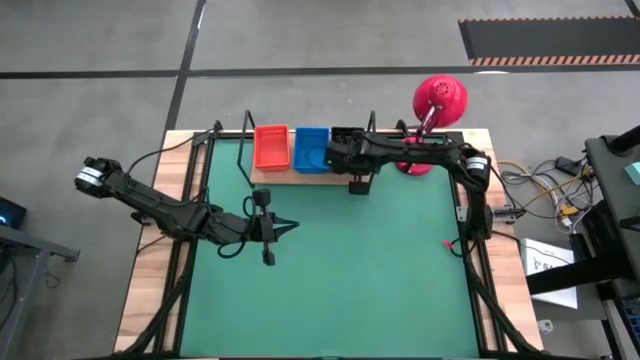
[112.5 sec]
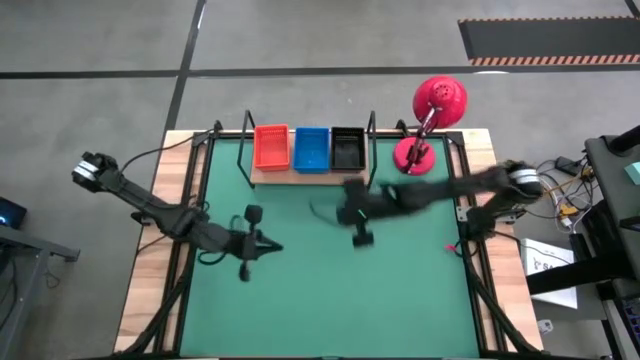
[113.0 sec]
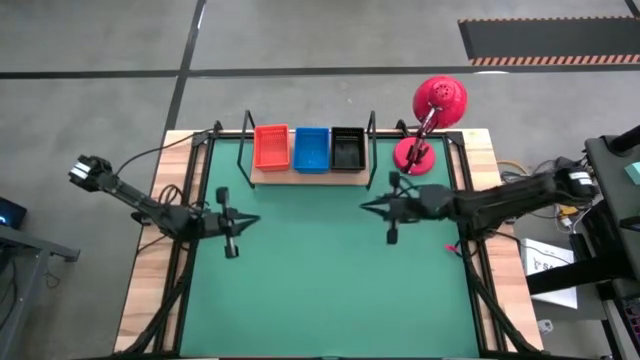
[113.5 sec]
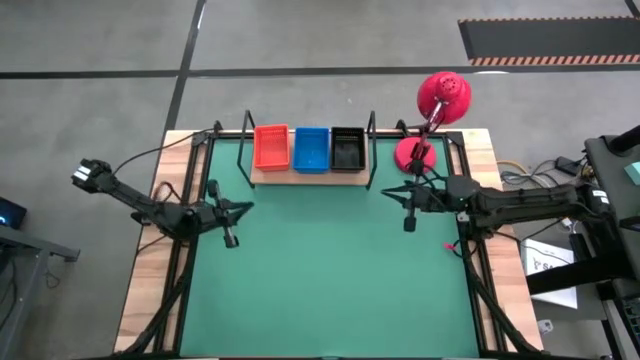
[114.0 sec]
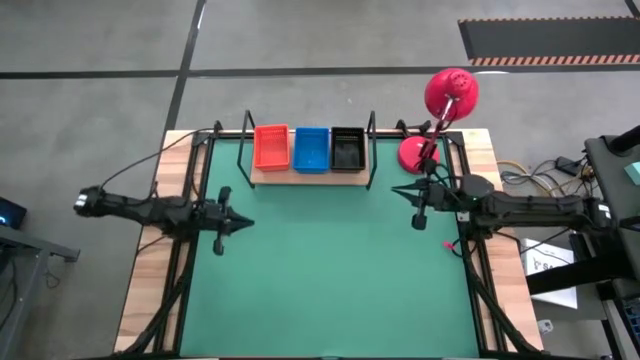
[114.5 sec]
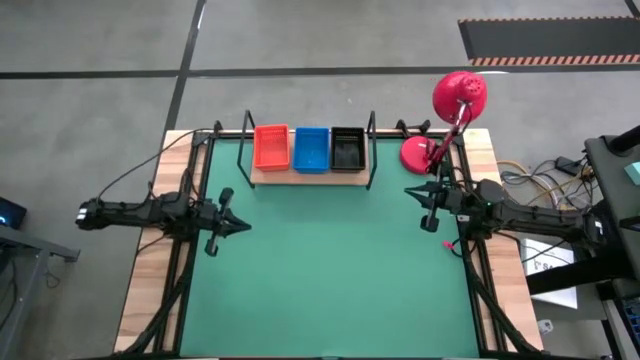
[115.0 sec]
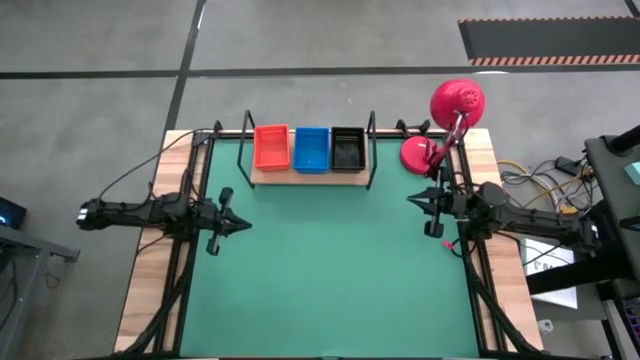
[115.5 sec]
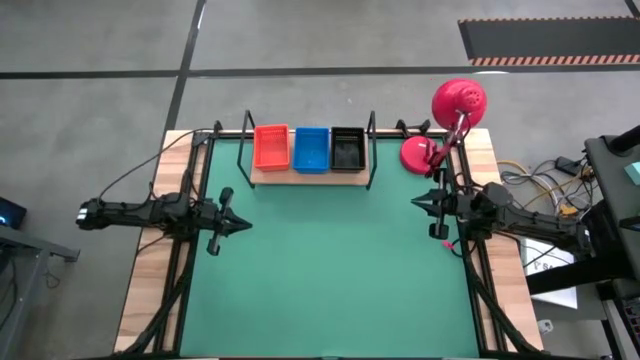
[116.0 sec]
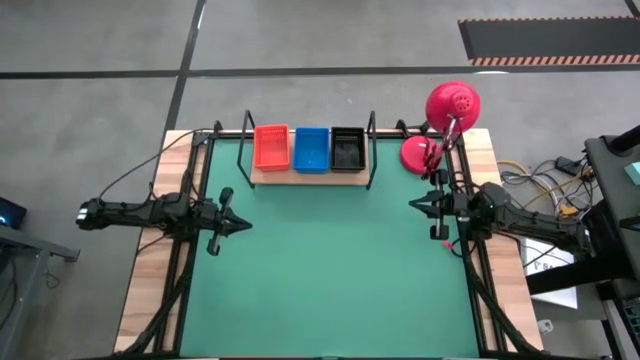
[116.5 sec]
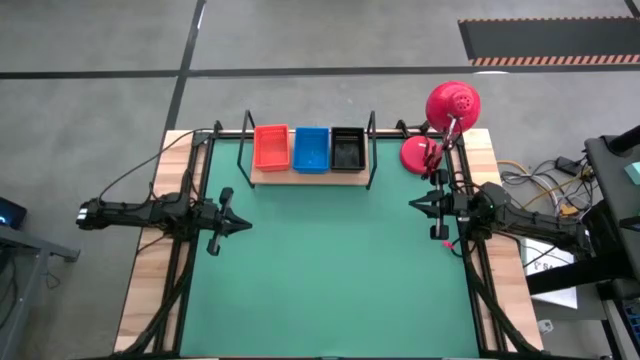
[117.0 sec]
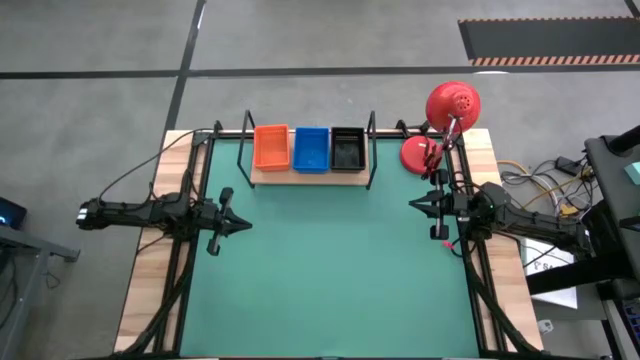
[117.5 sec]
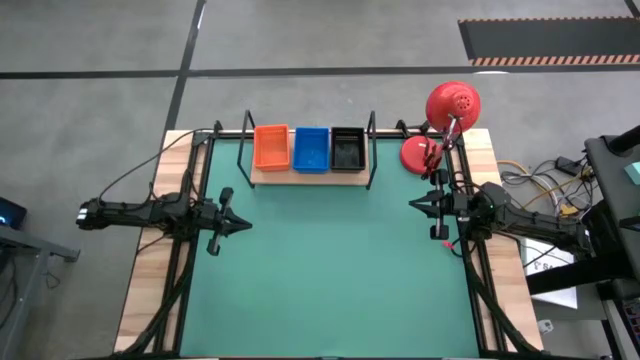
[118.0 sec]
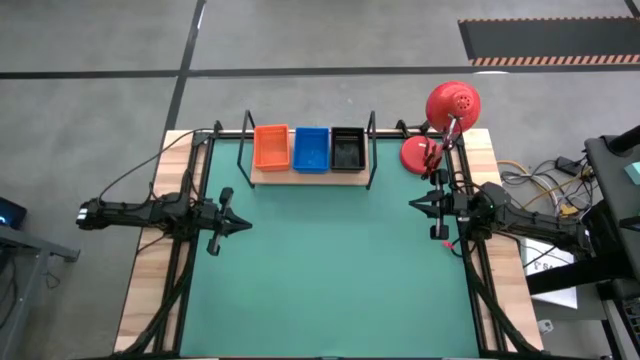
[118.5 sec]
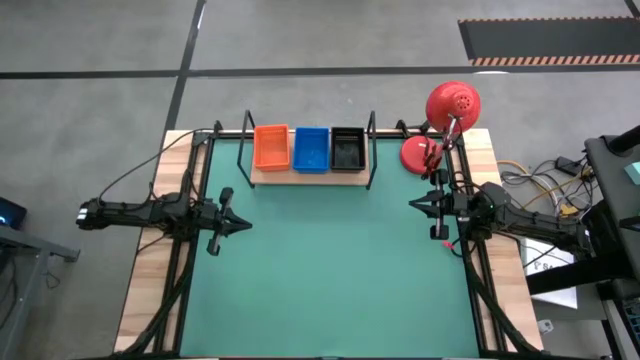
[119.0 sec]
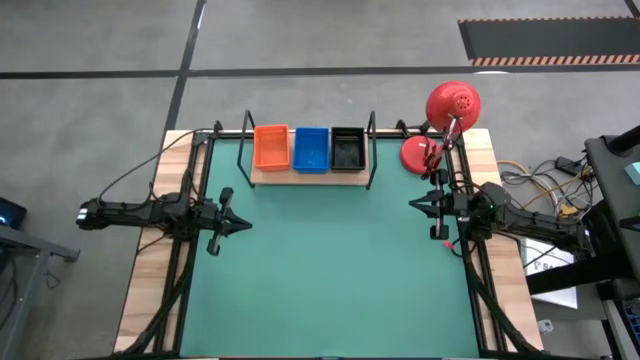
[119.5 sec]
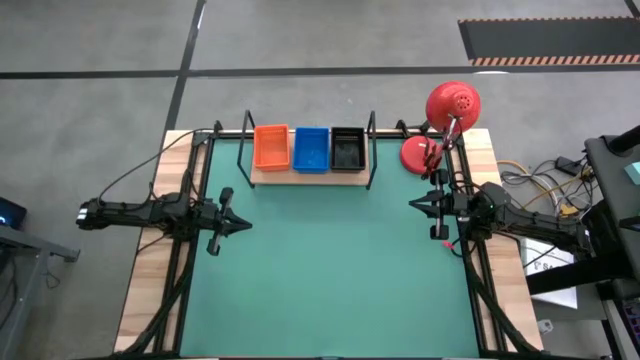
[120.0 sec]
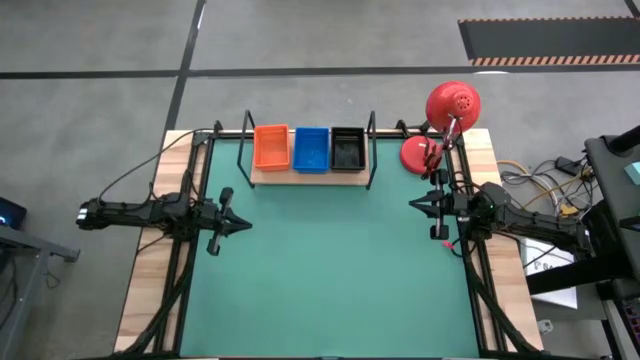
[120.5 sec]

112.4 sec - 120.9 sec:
Task: Stack baskets on shelf by color
Return to Home Position

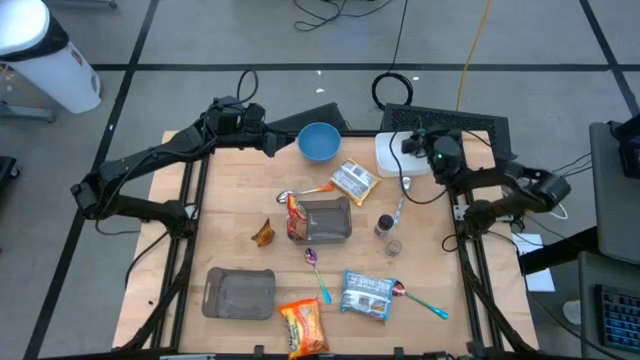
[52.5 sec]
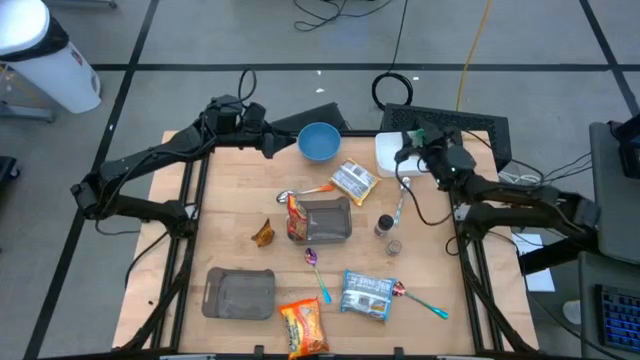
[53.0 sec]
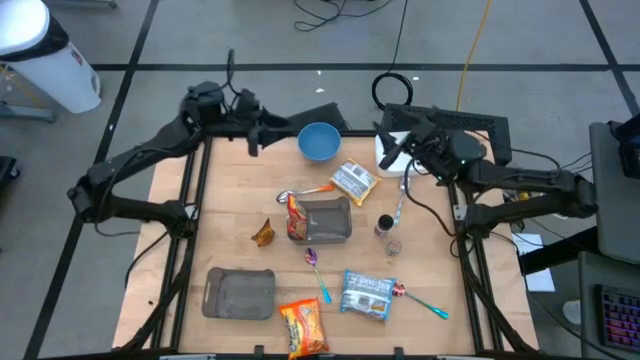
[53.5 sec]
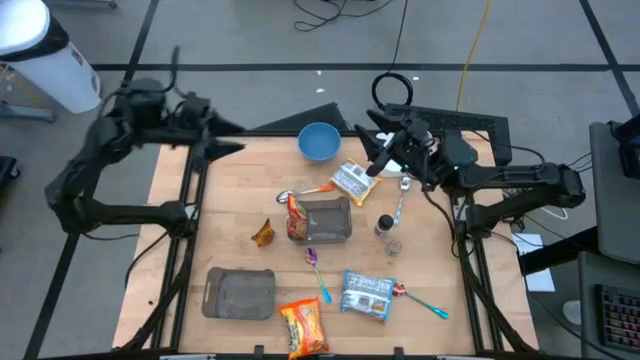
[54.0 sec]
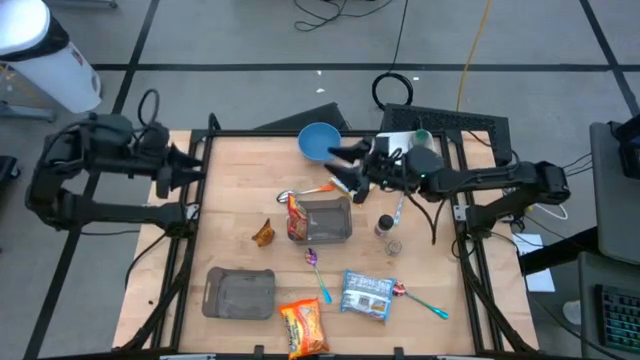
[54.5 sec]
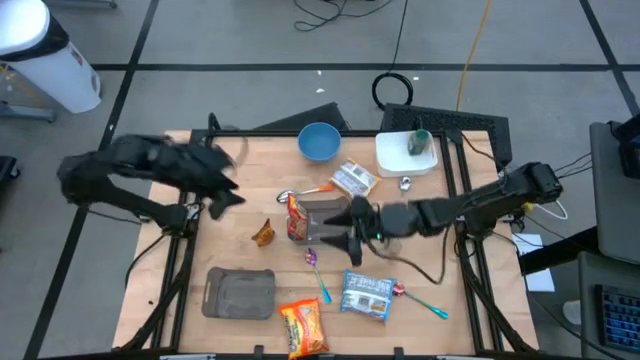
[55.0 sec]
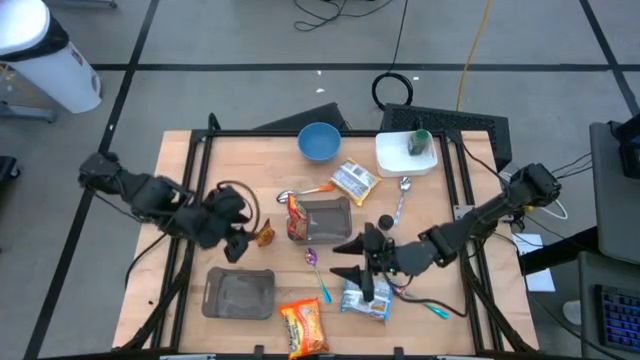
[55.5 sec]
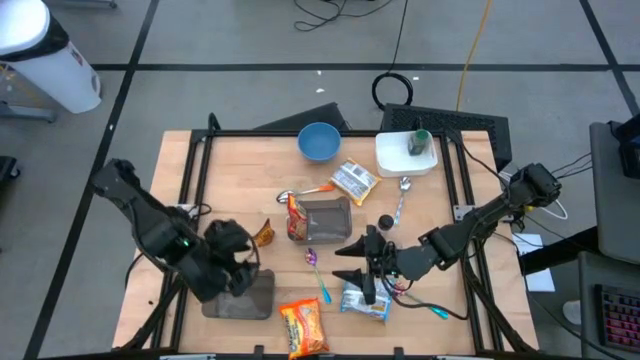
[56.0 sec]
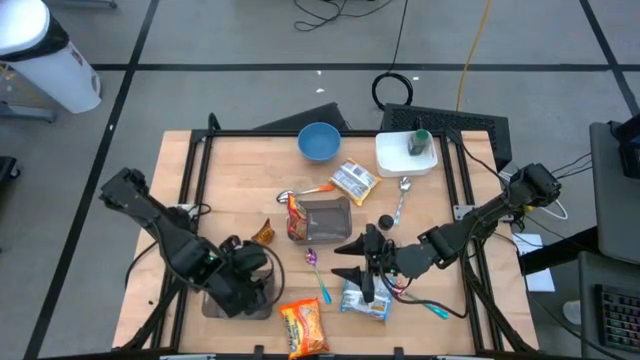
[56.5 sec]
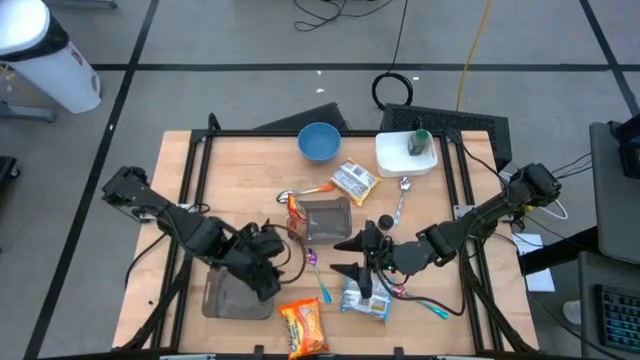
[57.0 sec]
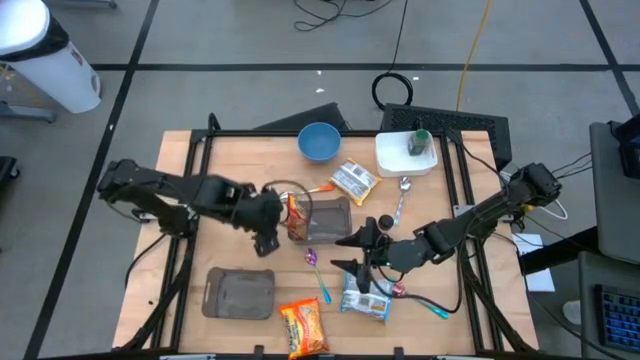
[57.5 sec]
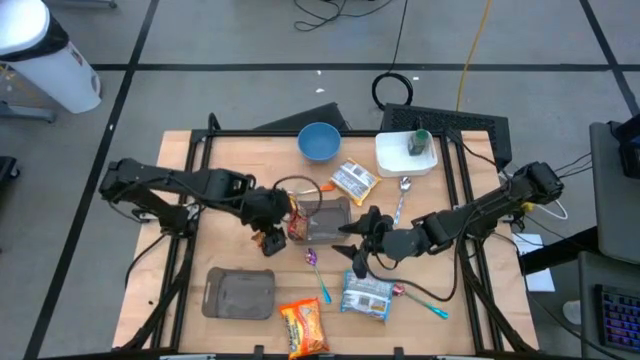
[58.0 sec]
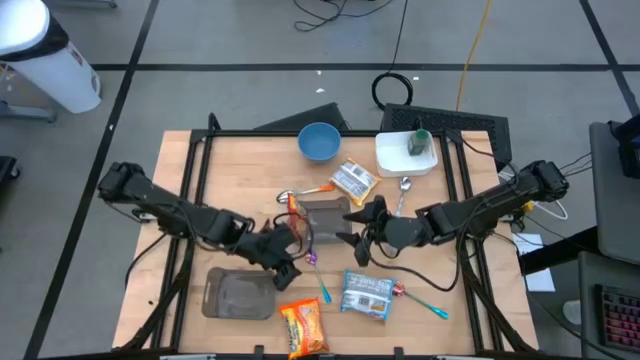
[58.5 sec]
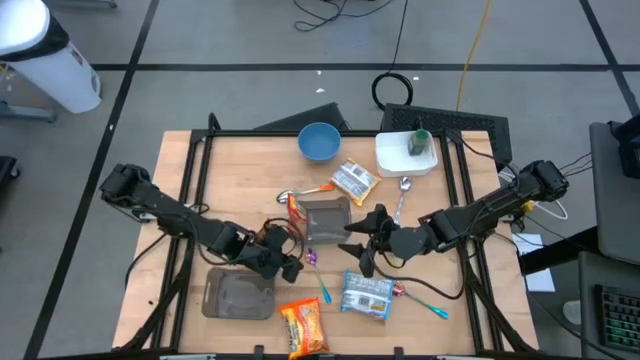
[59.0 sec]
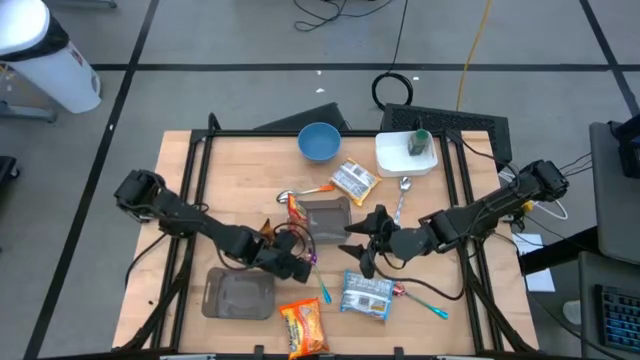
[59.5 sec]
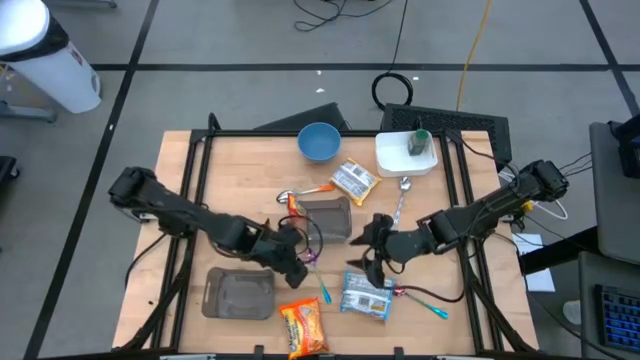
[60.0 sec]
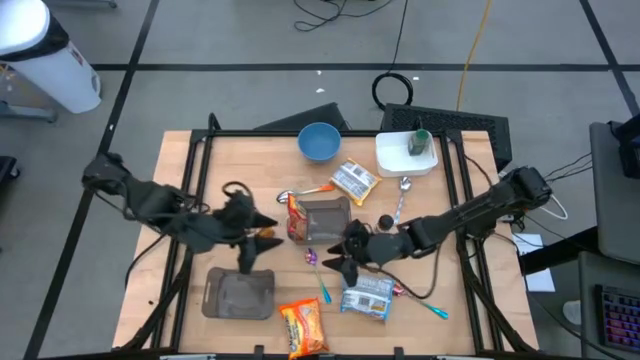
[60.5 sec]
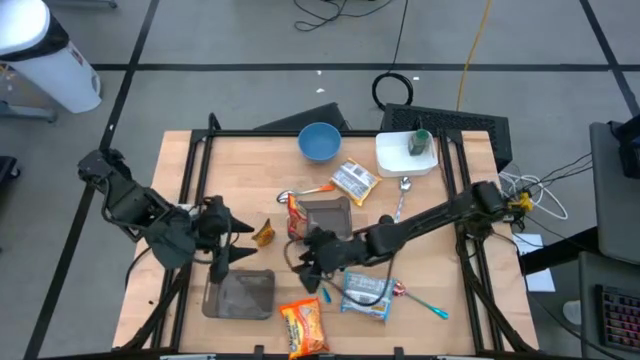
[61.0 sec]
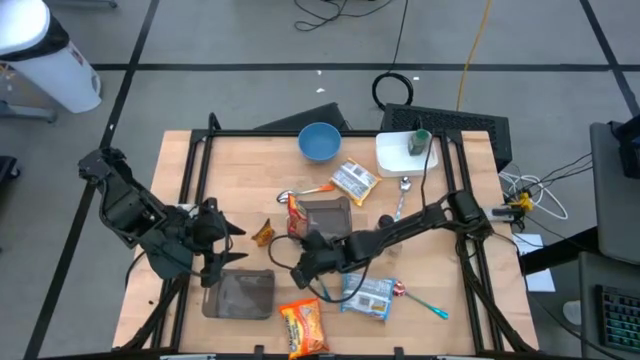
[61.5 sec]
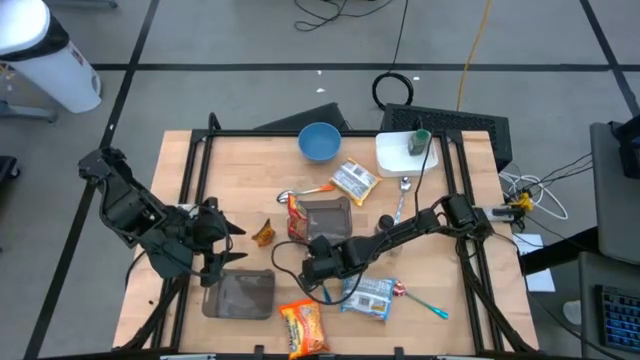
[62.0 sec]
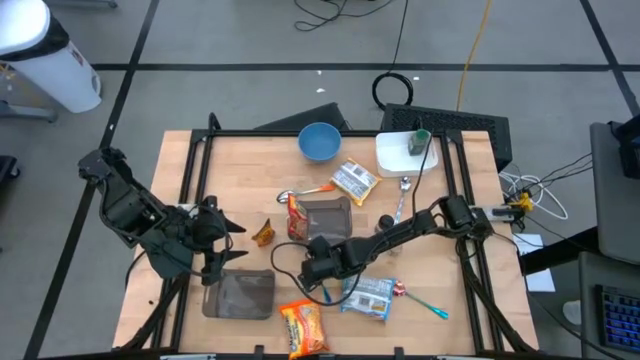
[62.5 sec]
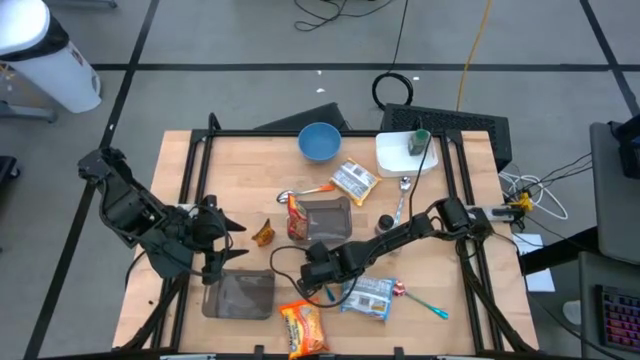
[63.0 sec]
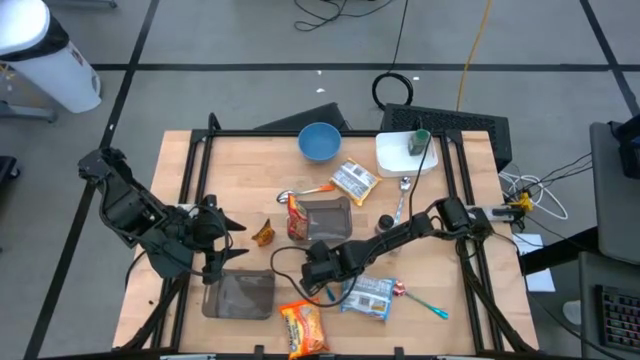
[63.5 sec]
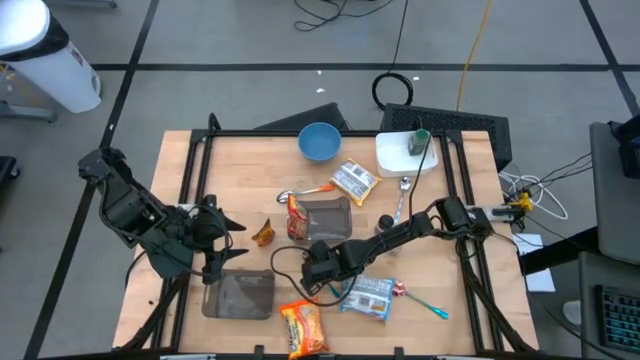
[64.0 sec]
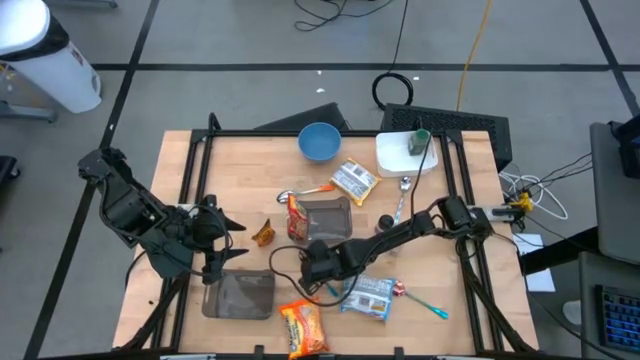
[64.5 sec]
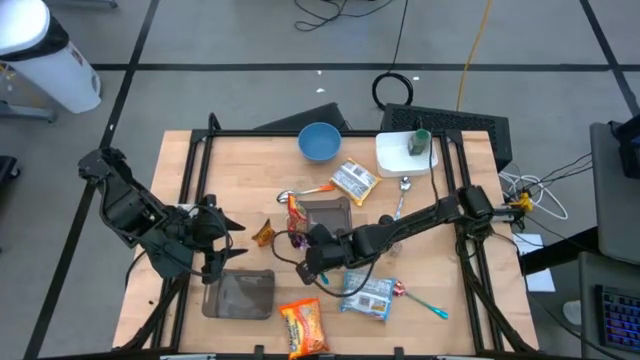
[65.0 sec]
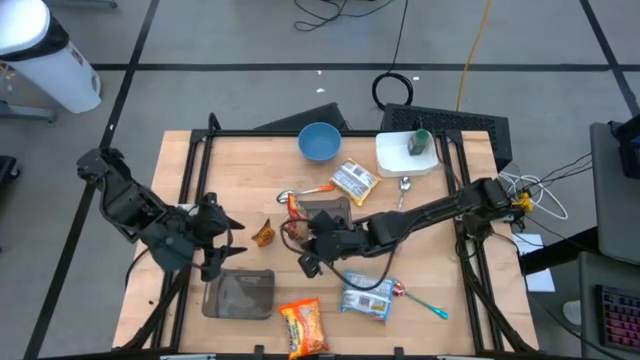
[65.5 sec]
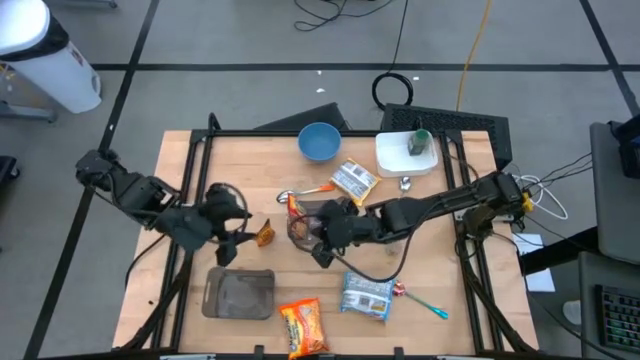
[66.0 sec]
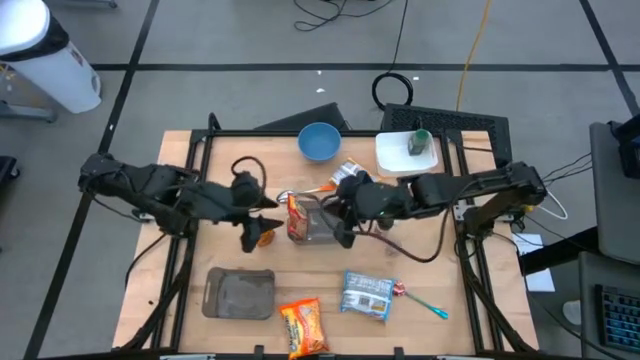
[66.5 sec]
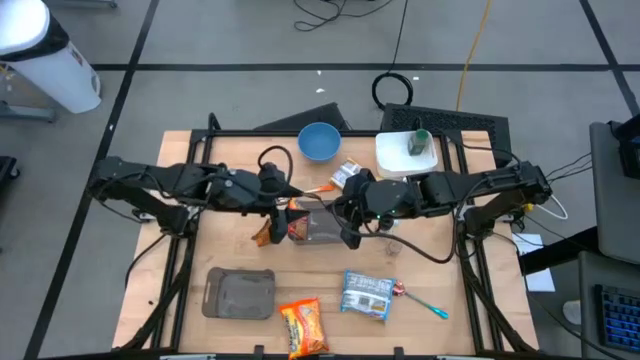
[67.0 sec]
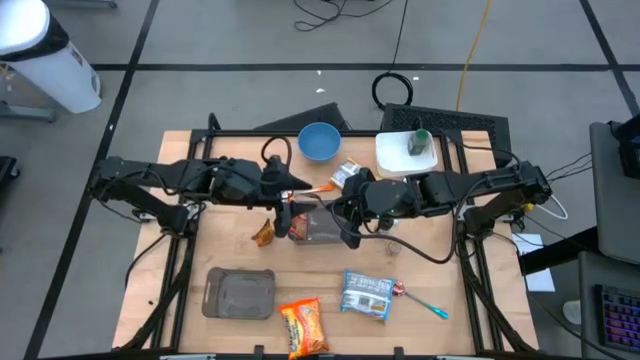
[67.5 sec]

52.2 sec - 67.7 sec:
Task: Pick & Place Food Item
Put the left blue spoon into the bottom black bin
